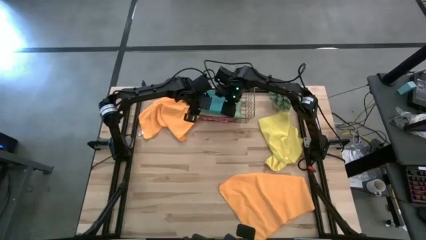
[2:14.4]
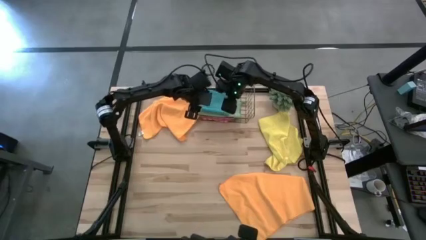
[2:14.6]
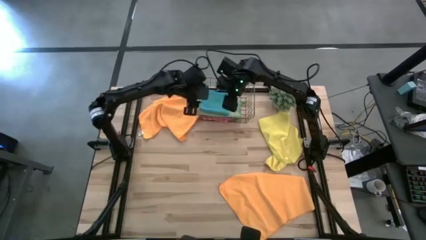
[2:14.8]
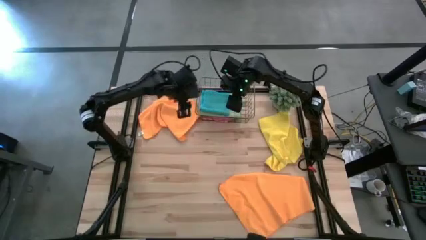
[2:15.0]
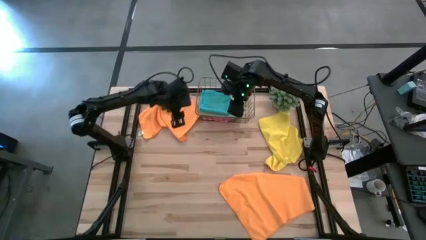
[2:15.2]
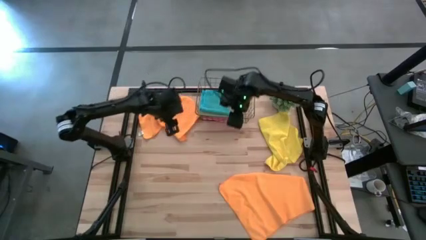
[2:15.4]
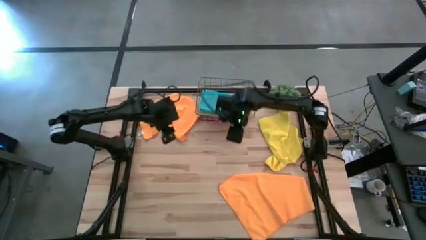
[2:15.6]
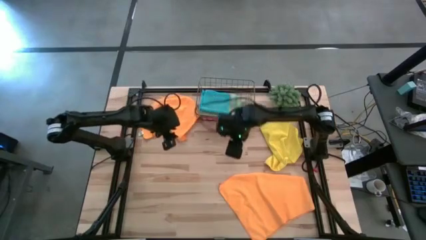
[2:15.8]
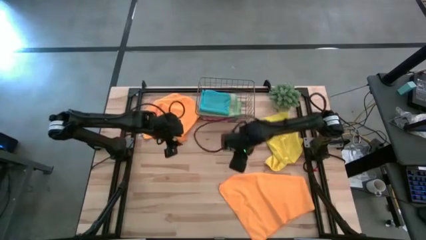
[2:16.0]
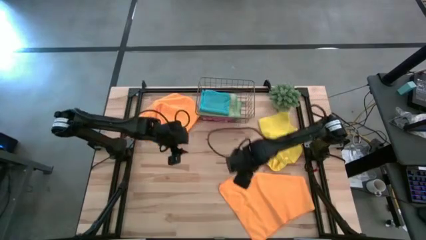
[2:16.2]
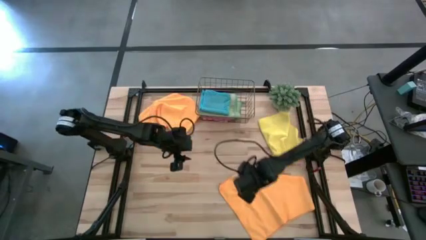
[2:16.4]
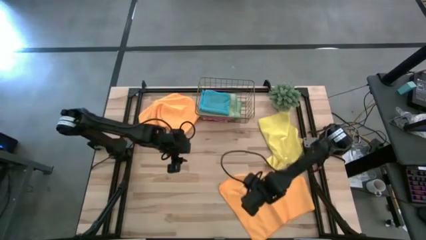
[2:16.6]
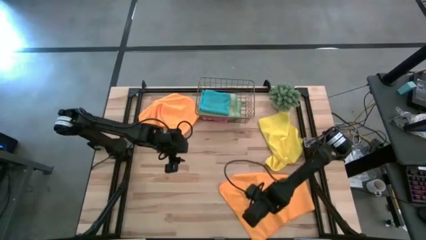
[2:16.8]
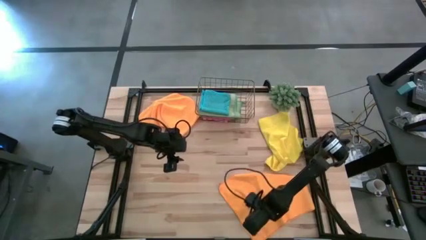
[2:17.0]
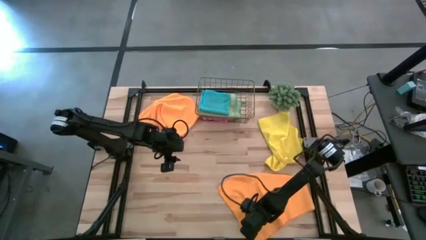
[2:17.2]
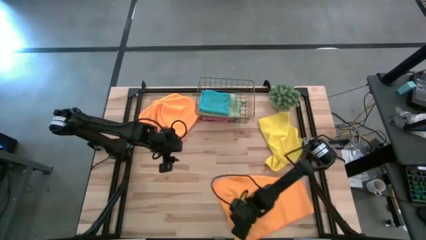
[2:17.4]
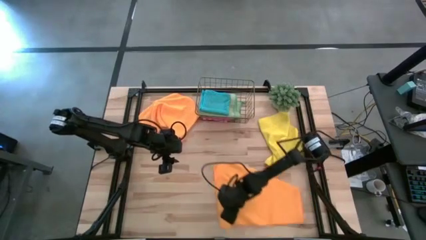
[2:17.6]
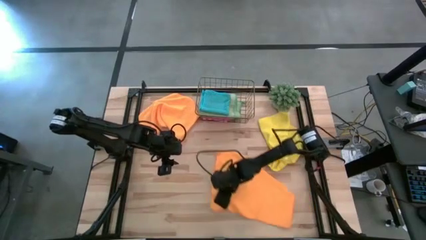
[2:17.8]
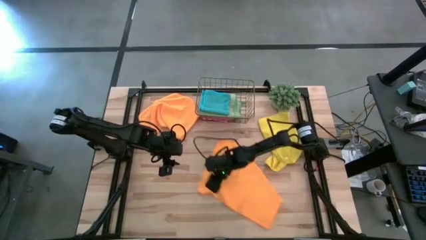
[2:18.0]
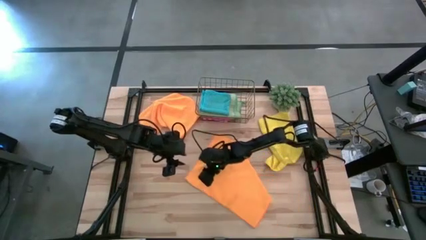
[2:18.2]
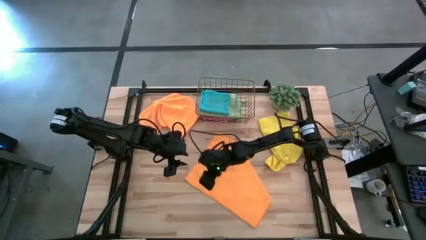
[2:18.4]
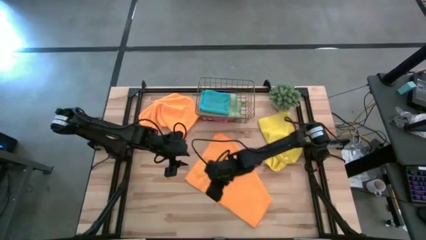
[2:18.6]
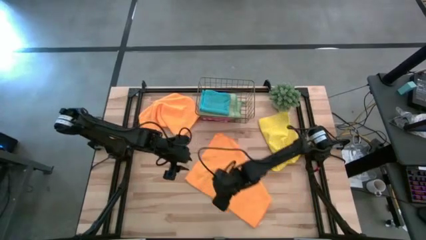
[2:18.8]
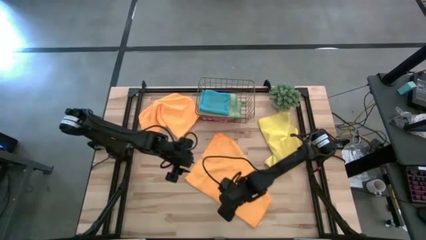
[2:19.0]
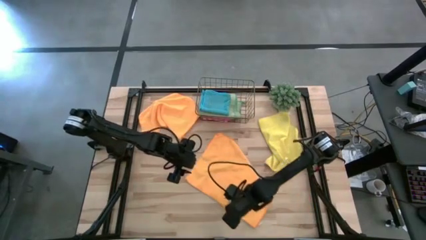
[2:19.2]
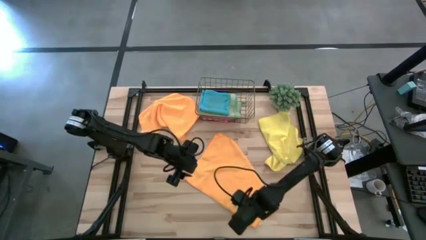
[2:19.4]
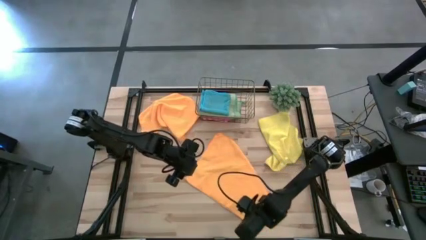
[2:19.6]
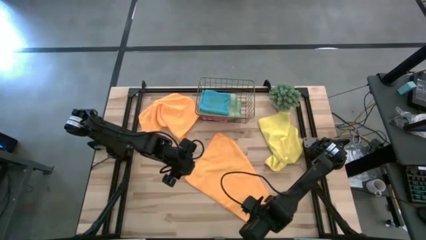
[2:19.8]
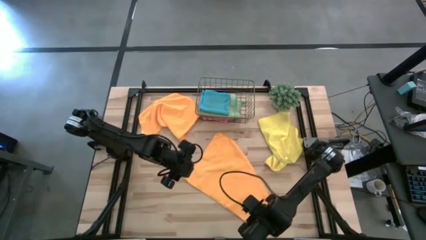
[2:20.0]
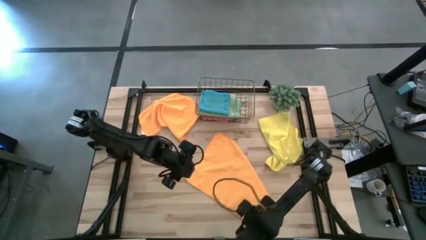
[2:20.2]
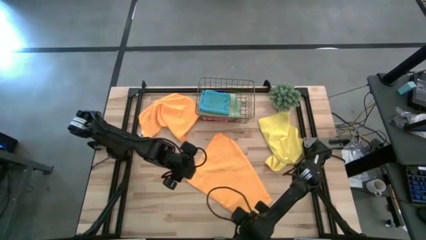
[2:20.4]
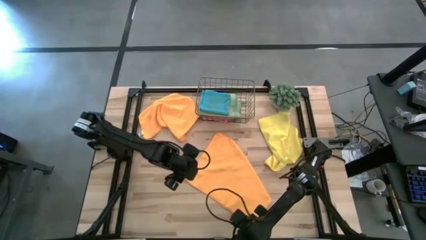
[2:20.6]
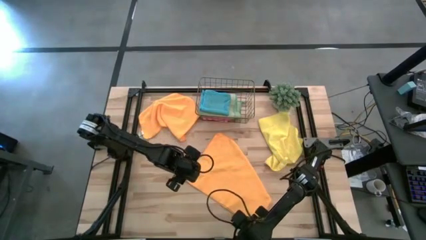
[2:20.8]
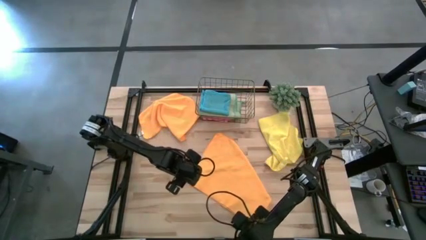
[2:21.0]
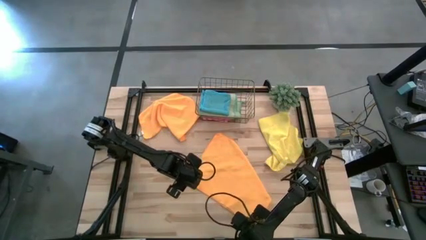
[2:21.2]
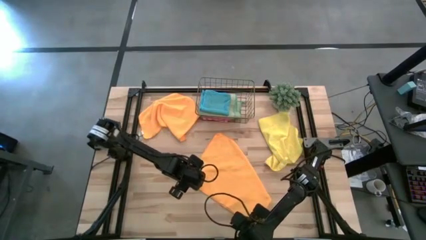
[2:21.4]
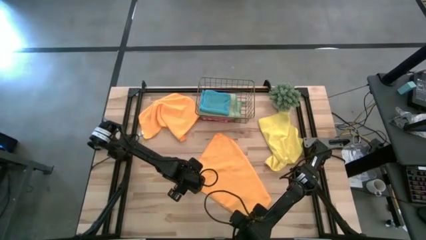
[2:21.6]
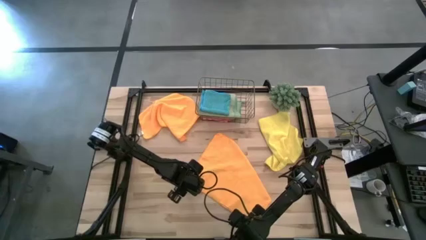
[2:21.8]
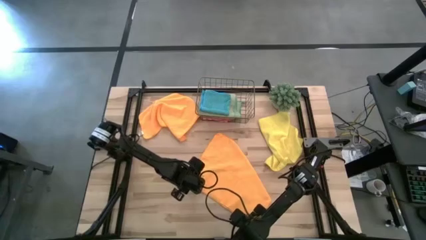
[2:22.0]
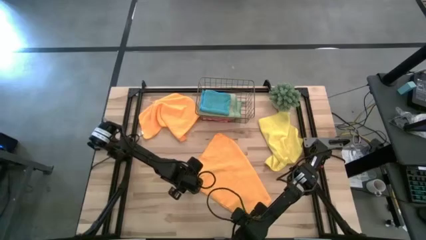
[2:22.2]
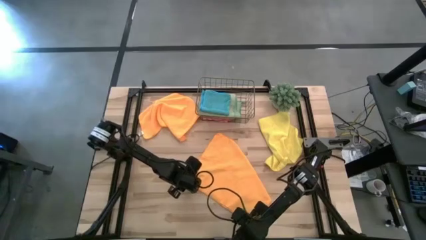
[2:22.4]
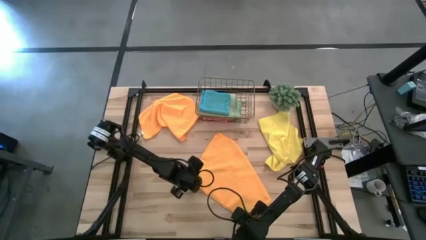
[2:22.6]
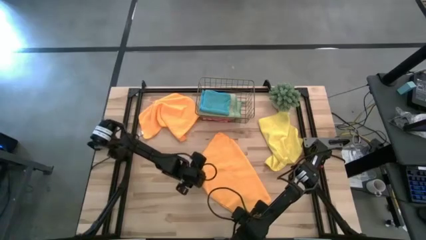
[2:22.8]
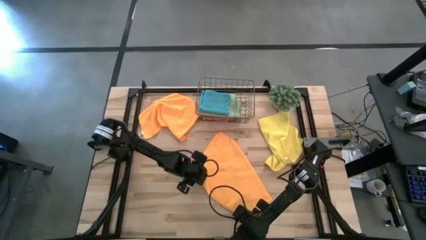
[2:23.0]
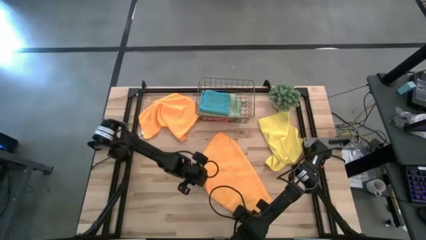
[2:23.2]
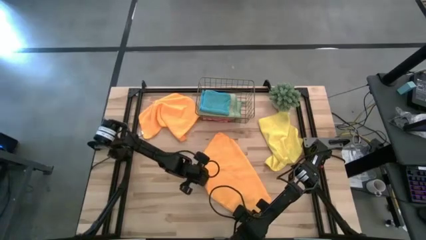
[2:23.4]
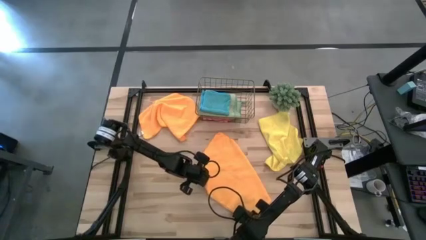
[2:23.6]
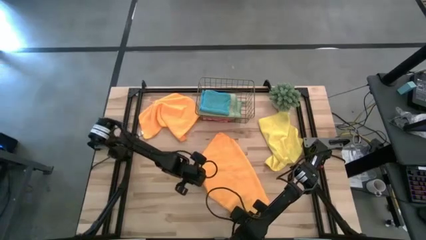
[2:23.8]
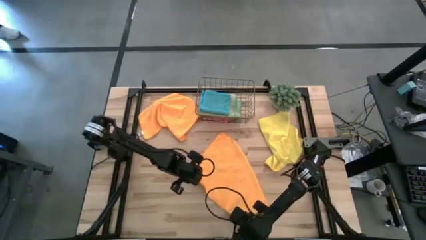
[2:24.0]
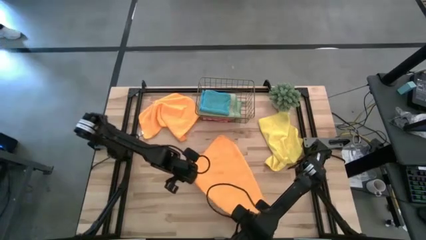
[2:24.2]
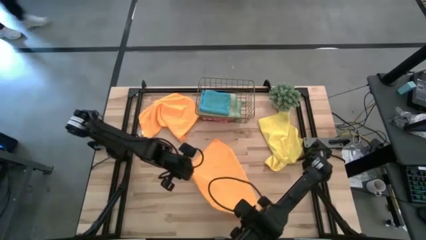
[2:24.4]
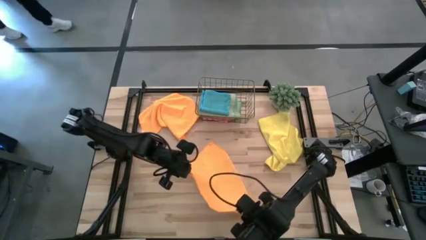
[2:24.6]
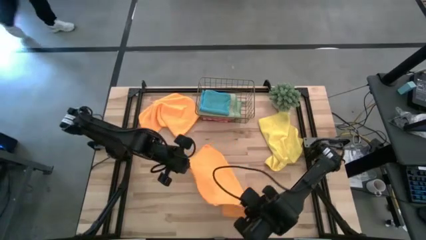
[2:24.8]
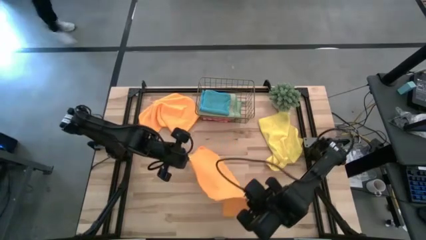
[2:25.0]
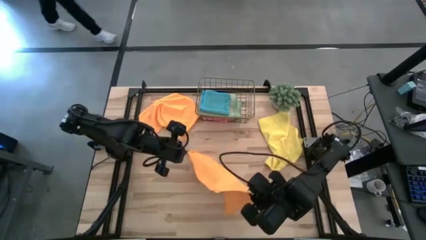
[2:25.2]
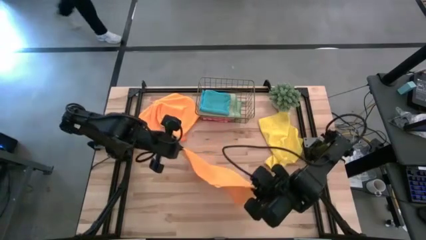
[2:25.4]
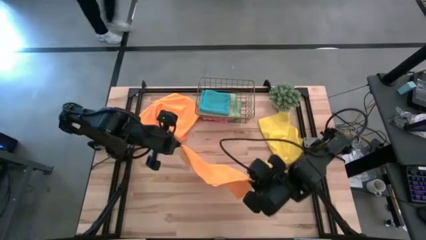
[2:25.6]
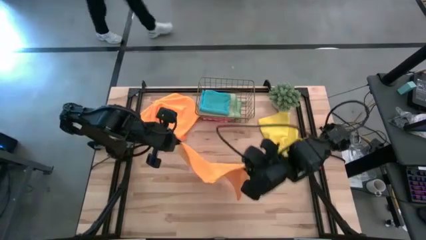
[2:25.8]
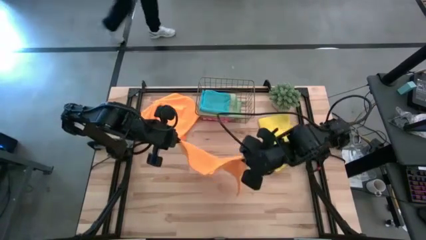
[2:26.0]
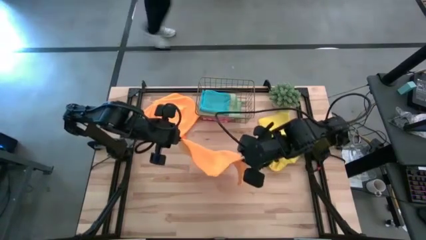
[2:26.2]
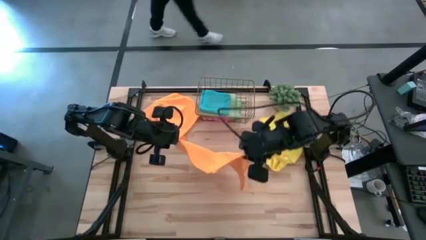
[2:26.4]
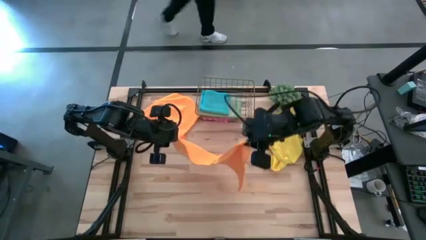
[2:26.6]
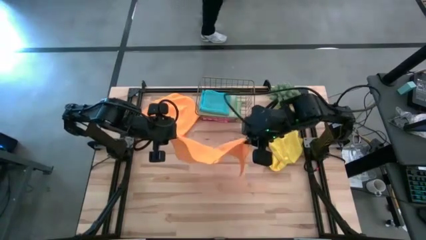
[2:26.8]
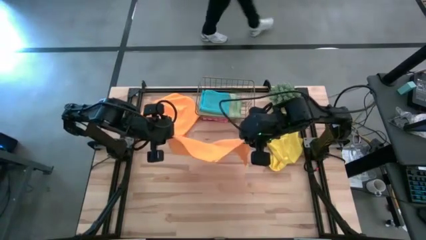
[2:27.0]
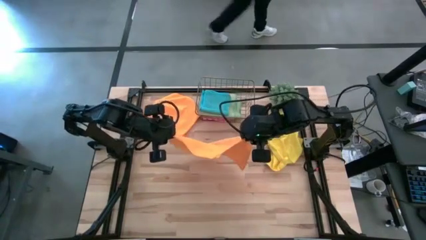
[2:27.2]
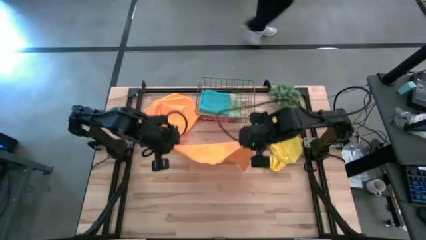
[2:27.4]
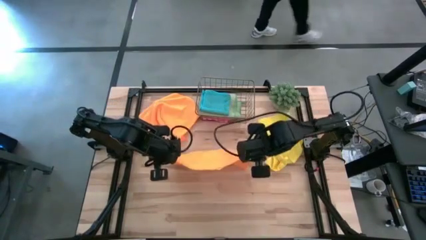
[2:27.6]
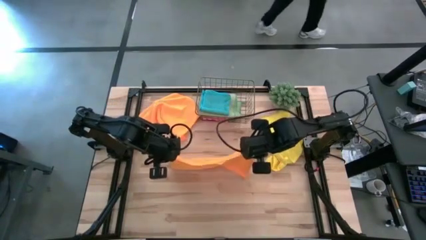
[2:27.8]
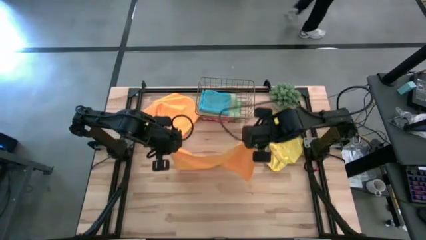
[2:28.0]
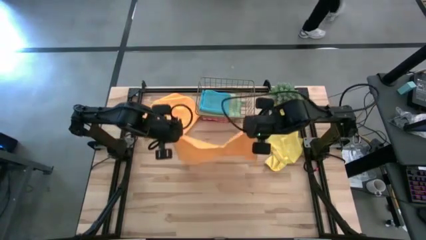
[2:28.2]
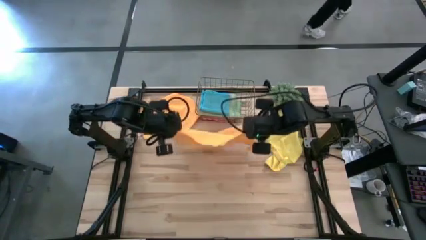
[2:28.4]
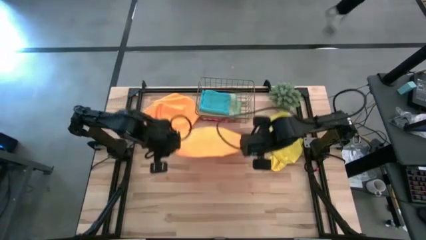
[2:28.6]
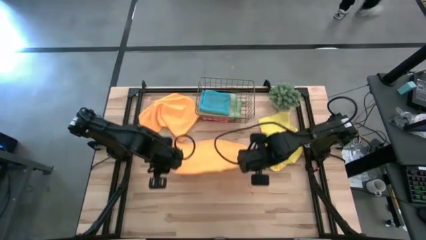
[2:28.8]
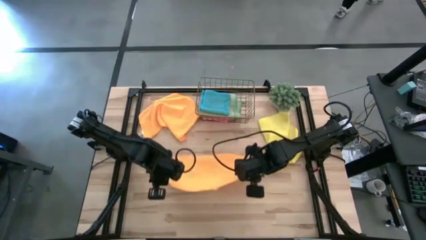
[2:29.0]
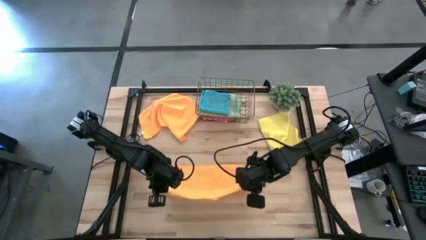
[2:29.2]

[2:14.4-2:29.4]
Task: Fold microfiber towels
Fold the bottom orange microfiber cloth

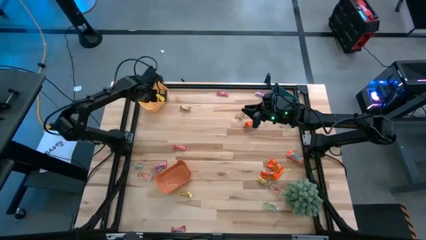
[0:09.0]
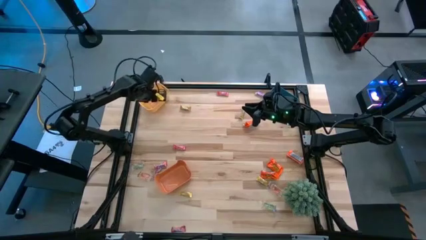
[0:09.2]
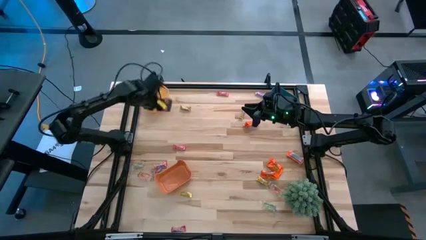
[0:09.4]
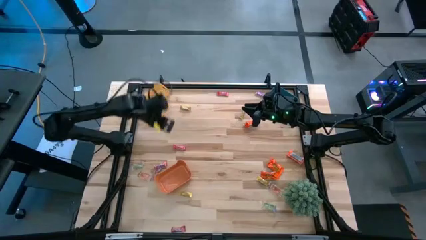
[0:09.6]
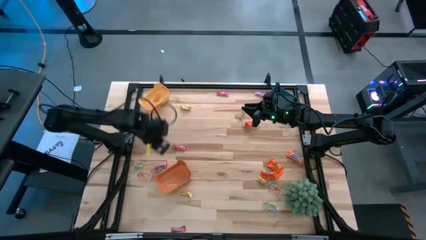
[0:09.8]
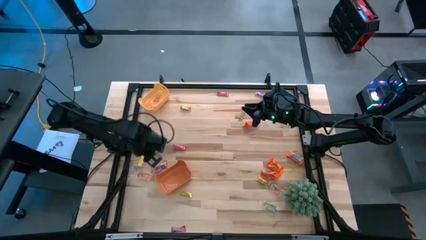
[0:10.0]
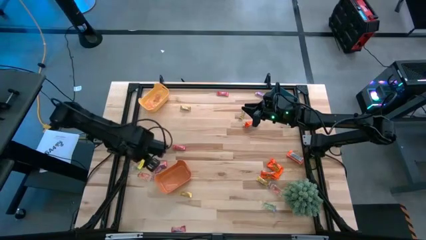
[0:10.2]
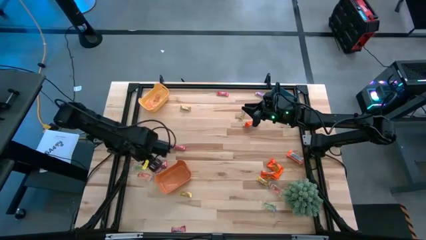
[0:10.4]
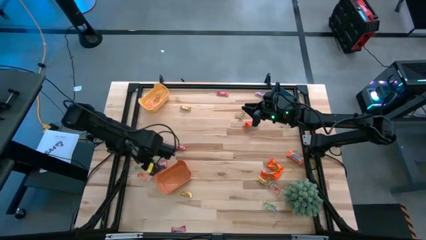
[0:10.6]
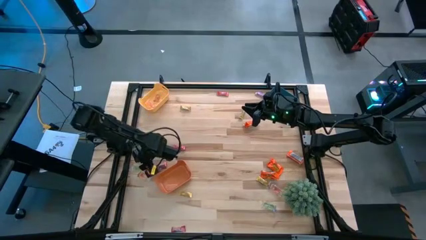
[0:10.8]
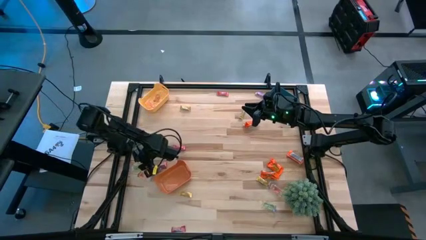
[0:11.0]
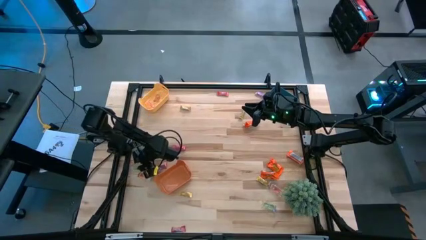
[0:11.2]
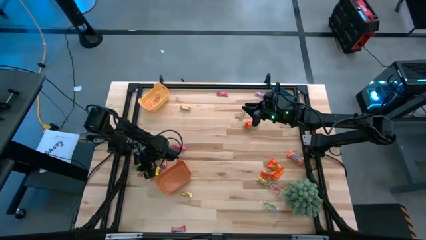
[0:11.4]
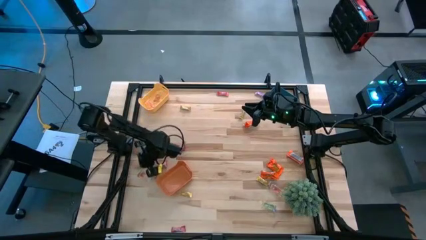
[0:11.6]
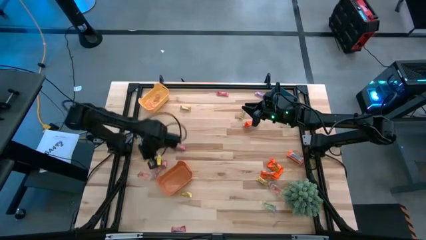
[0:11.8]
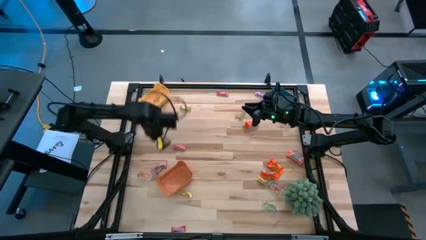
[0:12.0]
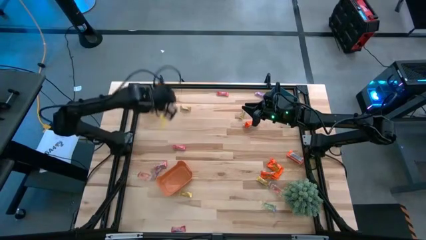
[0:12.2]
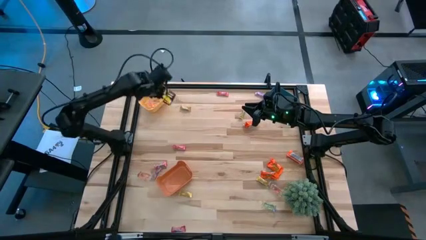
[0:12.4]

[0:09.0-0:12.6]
Task: Sort candy
Put the top green gummy into the yellow bin
